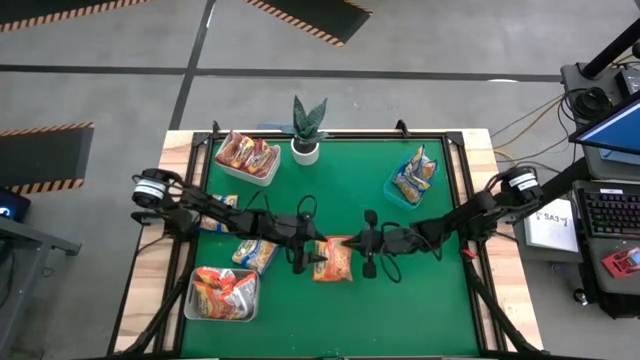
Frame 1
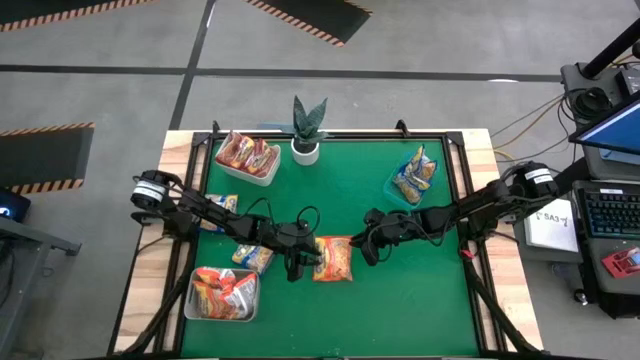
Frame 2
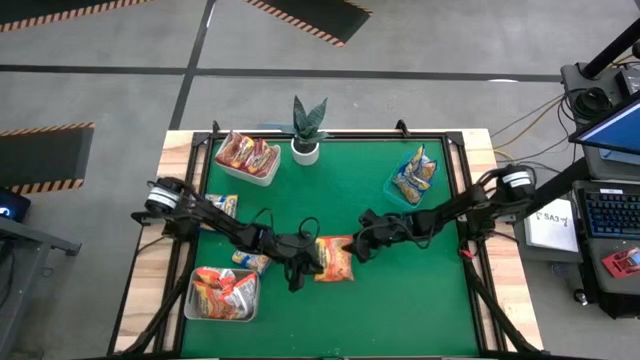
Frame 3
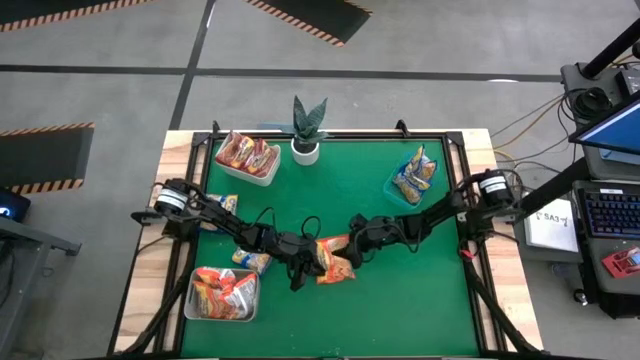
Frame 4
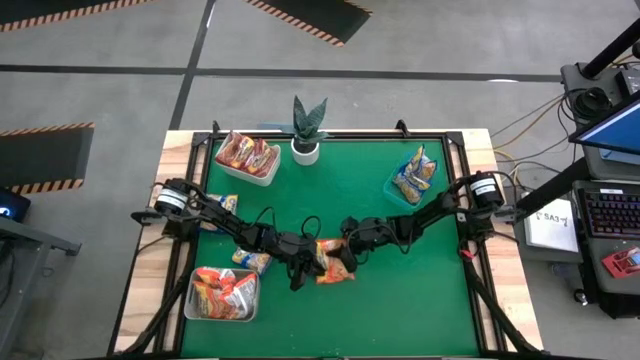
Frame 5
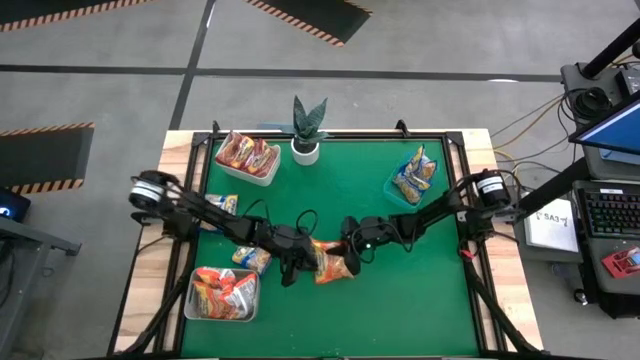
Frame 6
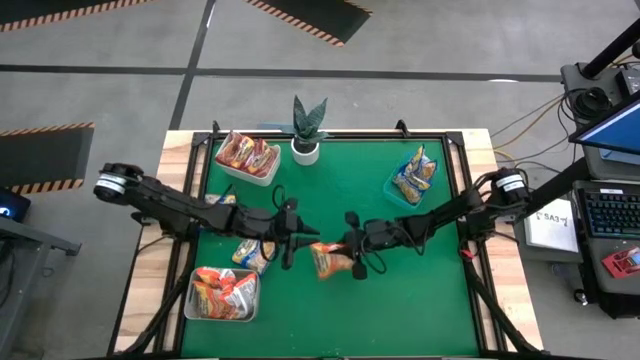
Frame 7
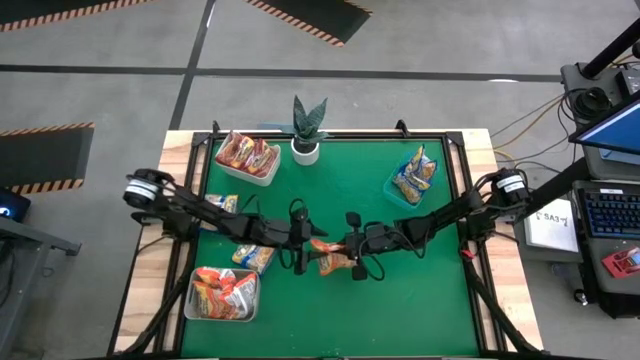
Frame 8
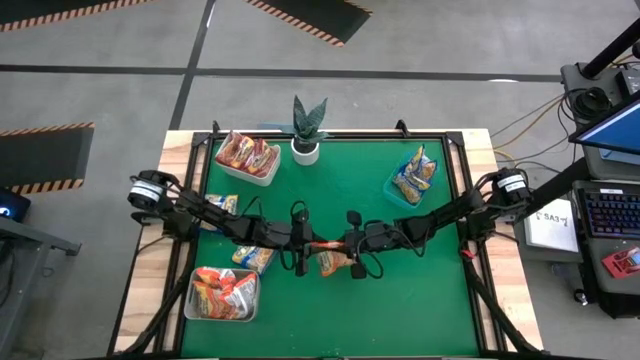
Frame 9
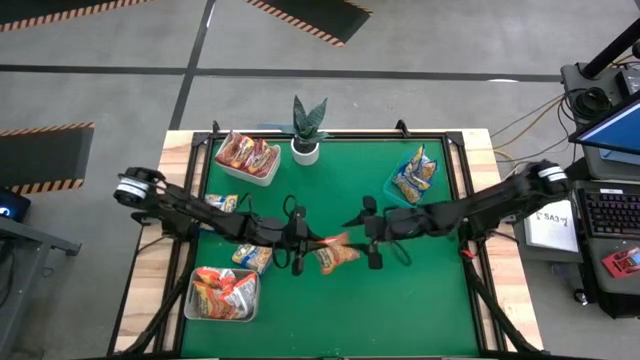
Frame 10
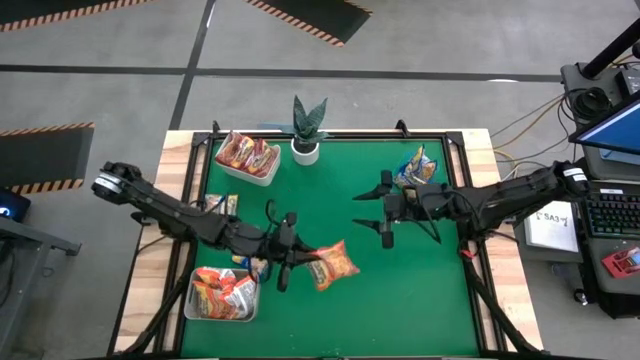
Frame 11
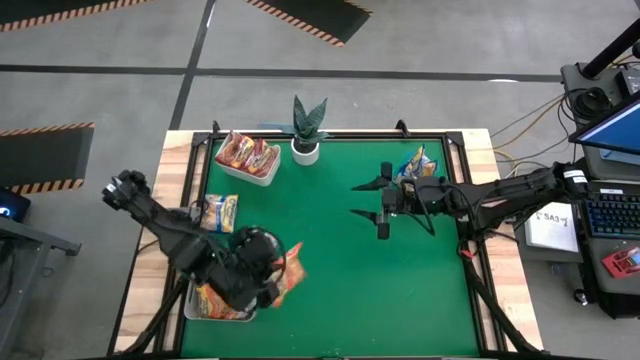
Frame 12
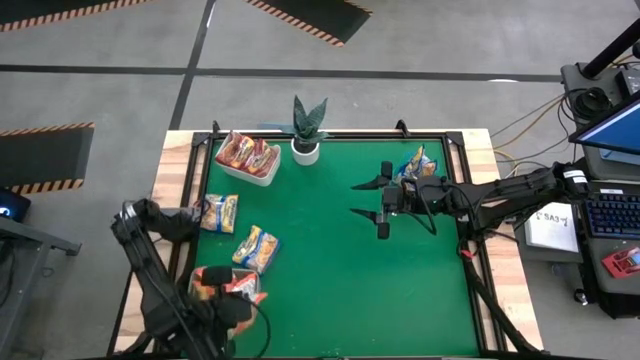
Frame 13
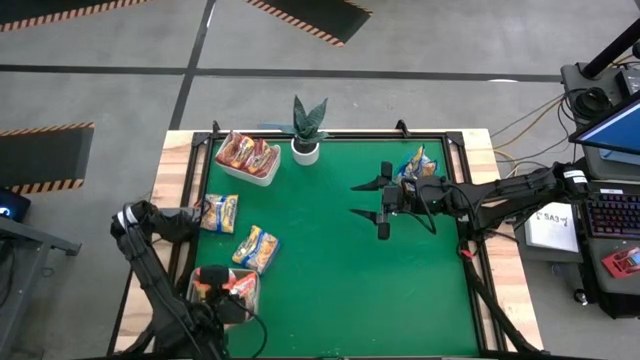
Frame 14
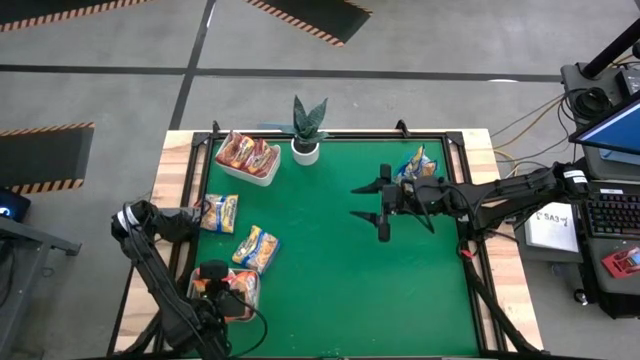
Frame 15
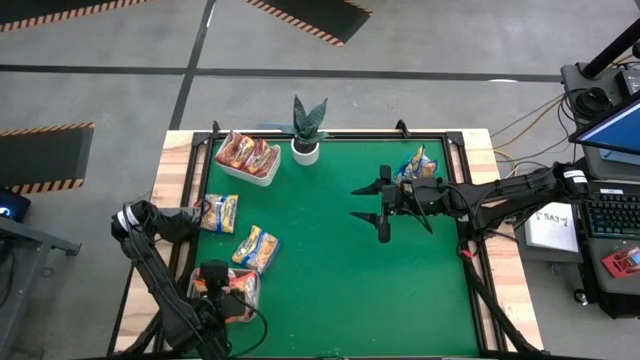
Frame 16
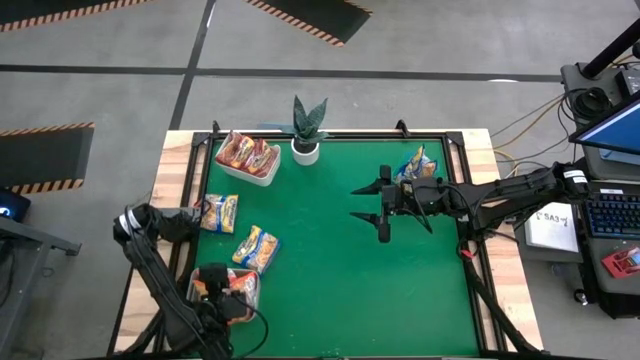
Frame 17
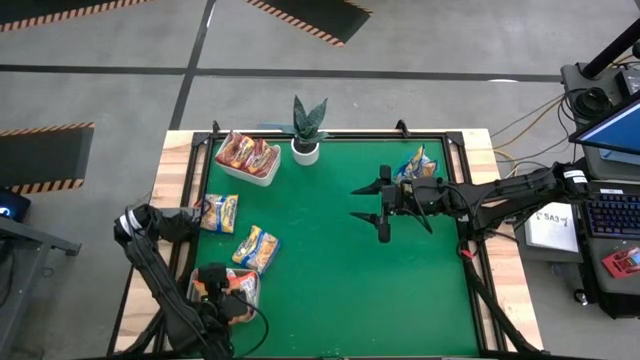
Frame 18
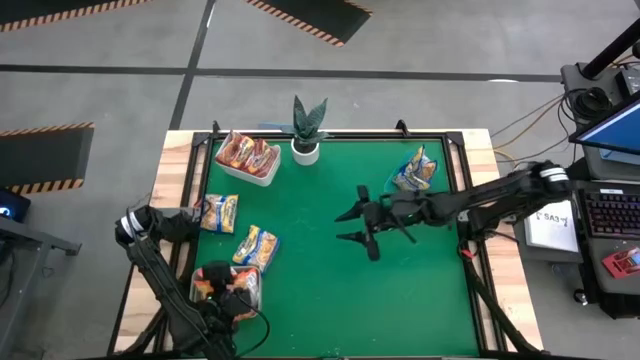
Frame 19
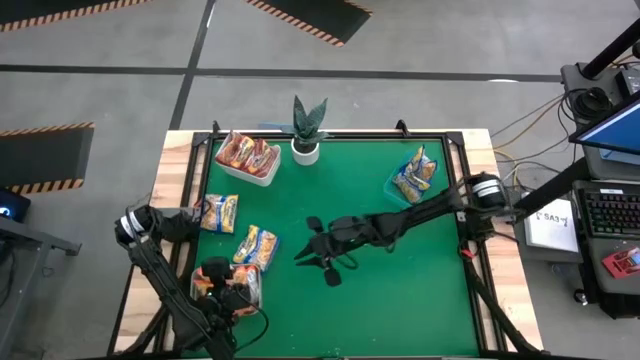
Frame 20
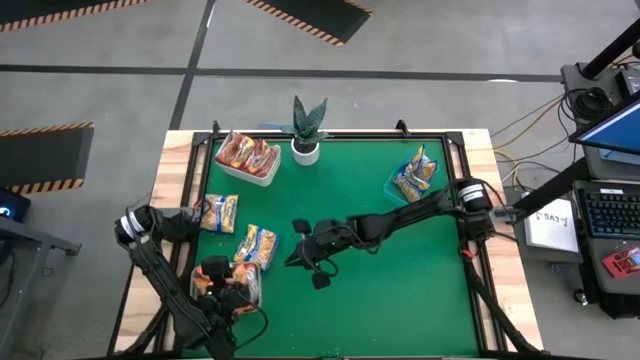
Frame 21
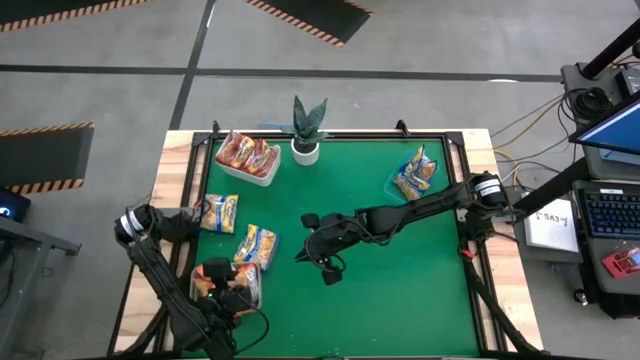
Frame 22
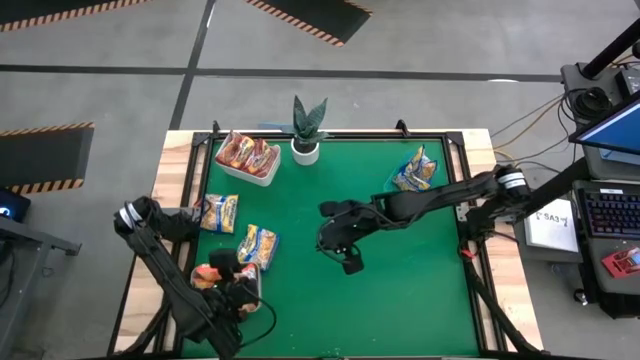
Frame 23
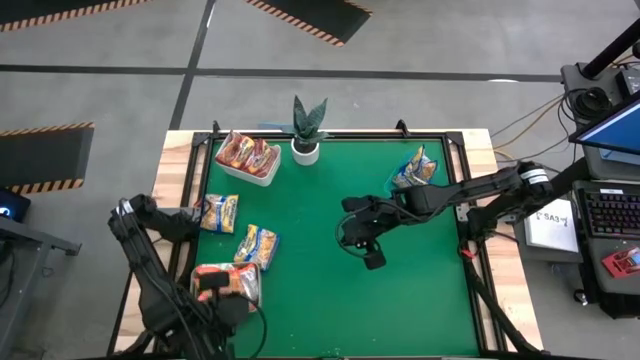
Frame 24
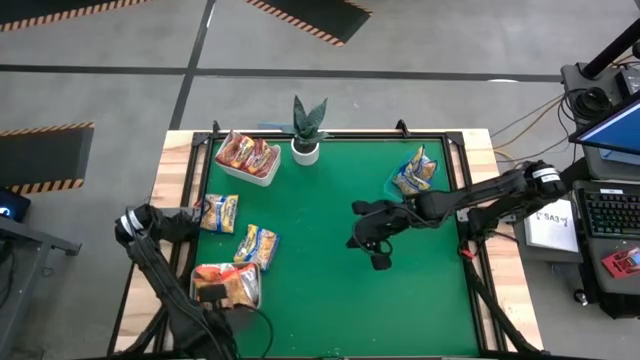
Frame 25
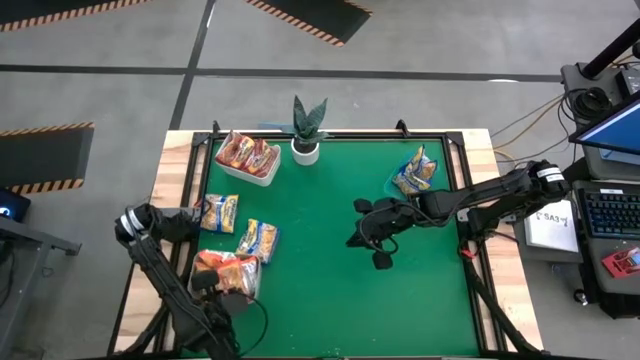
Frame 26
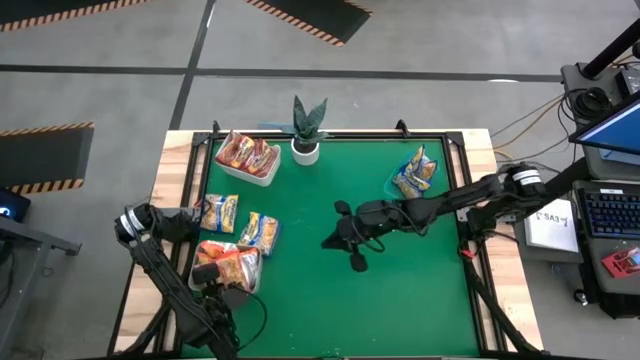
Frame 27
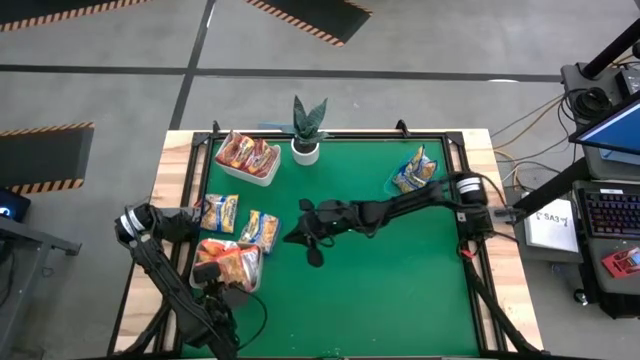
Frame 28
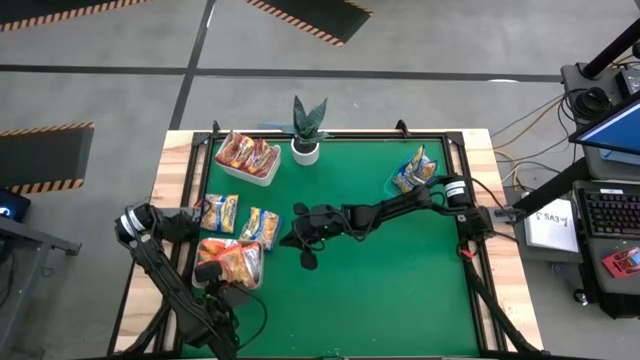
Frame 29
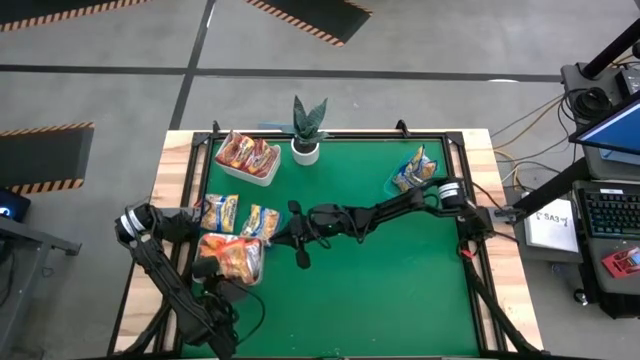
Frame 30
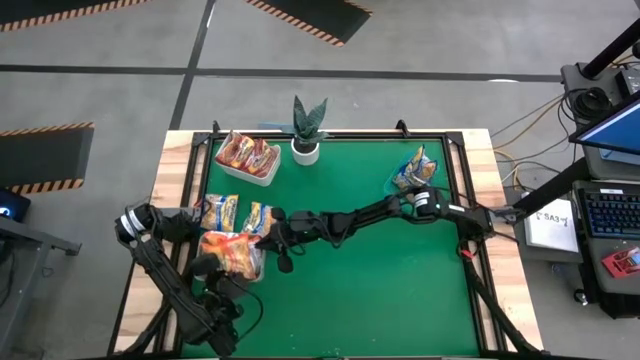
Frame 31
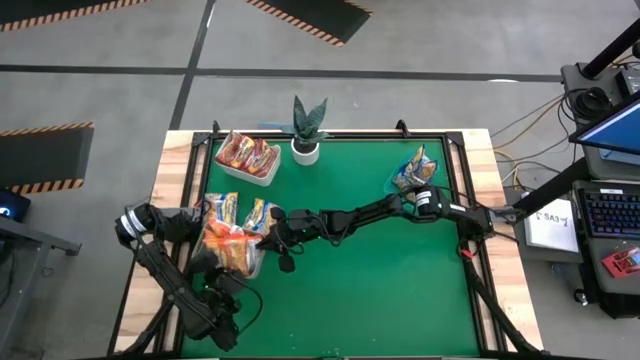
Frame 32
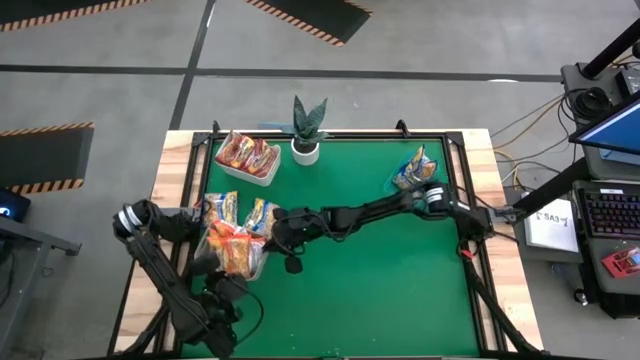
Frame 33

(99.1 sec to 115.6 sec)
Task: Sort Maruchan noodles
Put the orange noodle pack into the gray bin

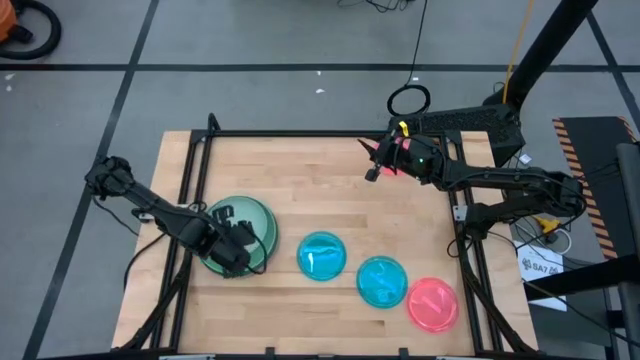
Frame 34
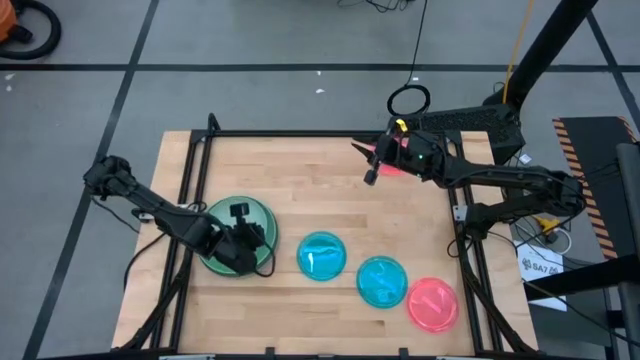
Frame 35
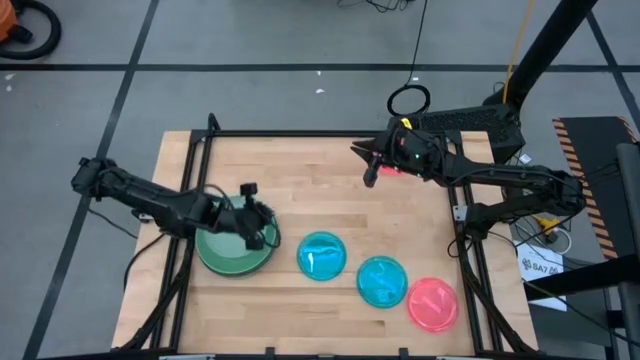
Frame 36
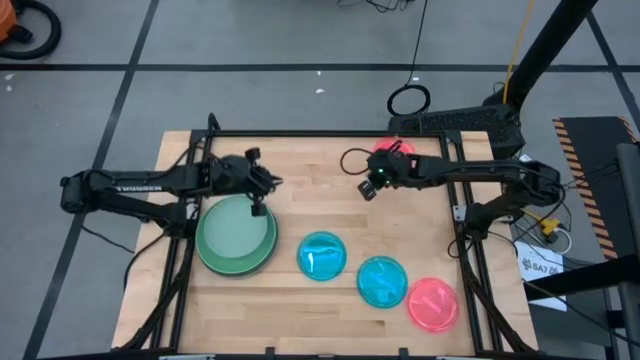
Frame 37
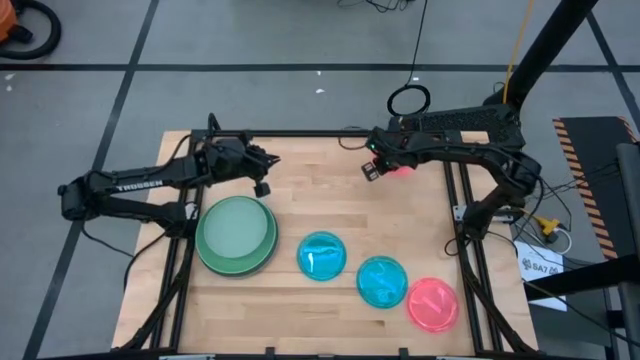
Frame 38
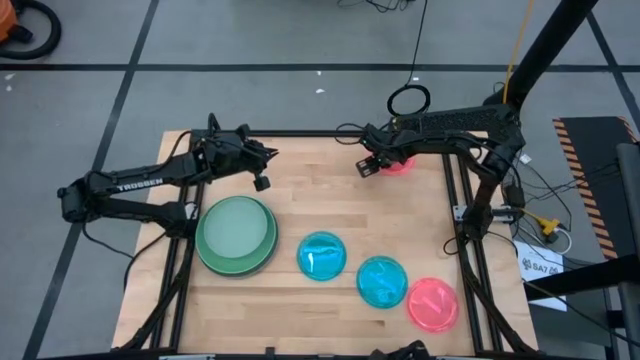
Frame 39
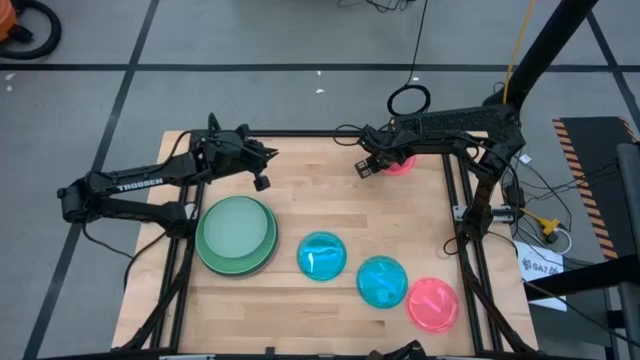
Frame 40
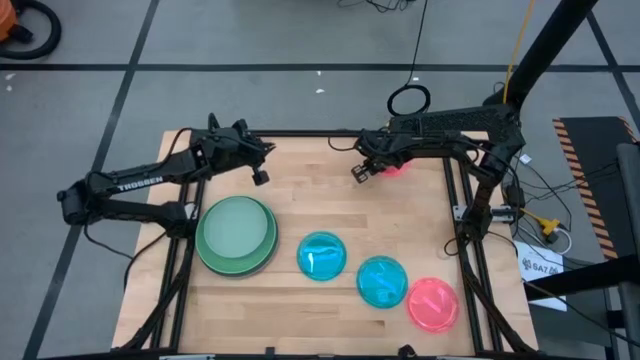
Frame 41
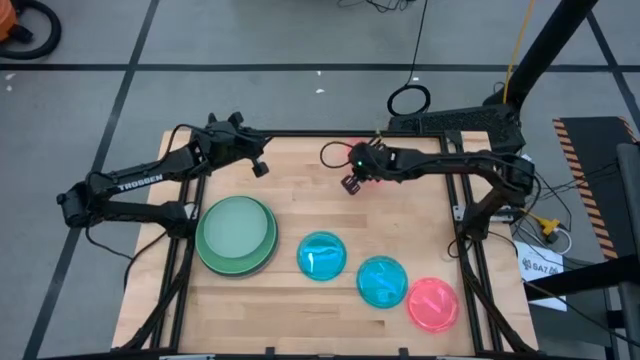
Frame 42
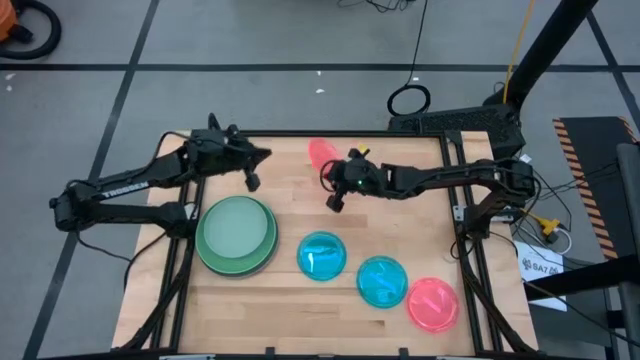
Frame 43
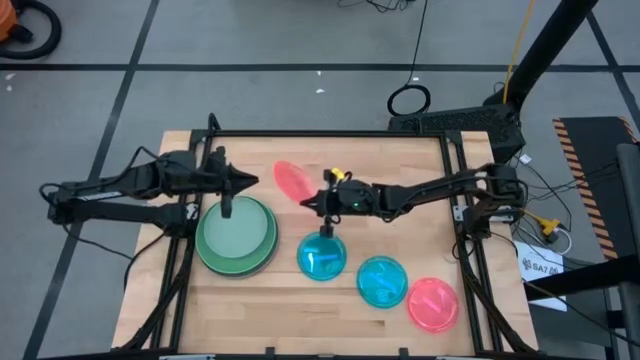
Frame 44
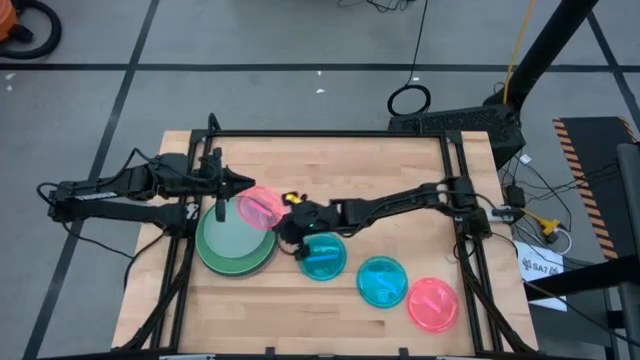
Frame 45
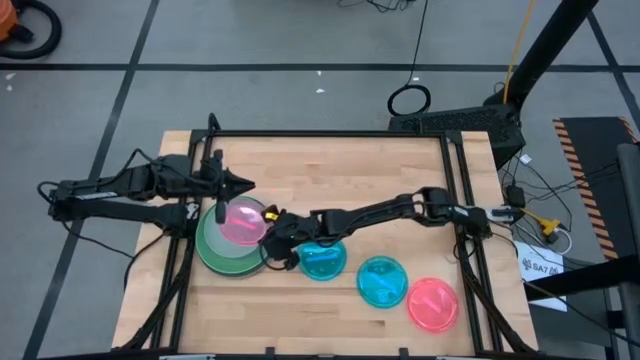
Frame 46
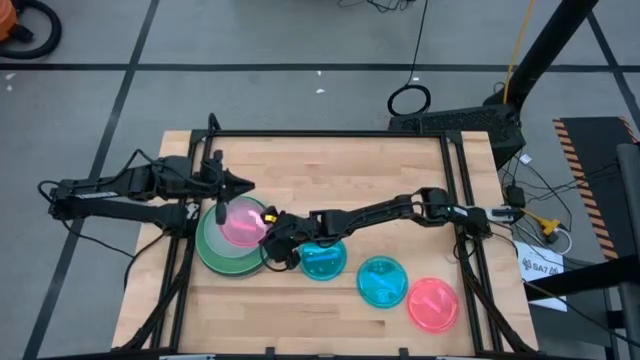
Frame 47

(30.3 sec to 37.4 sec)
Task: Stack plastic plates
Stack the top light pink plate on top of the light green plate
